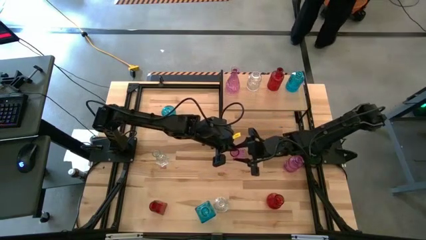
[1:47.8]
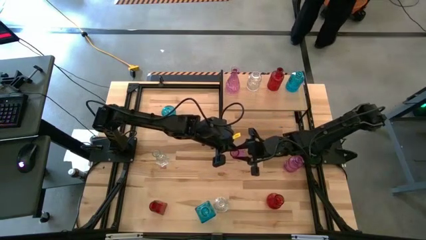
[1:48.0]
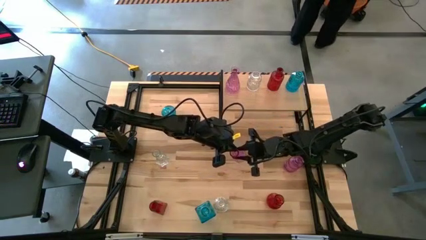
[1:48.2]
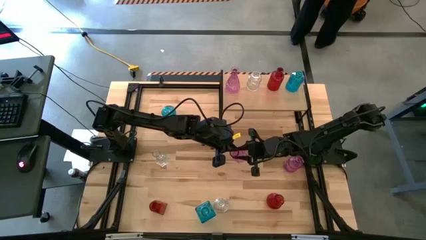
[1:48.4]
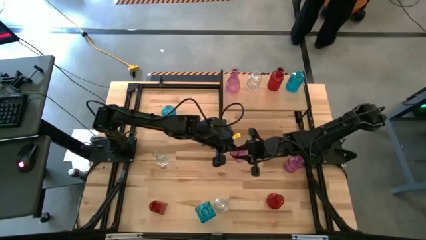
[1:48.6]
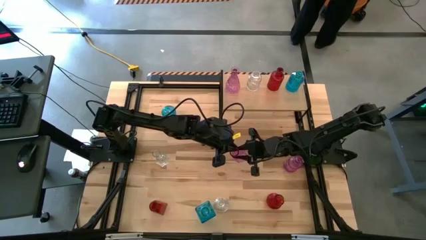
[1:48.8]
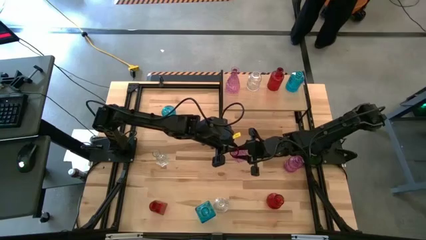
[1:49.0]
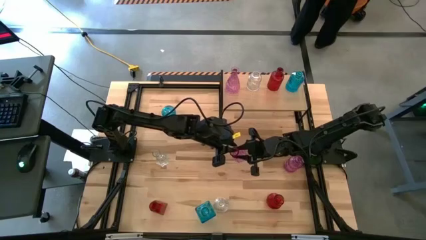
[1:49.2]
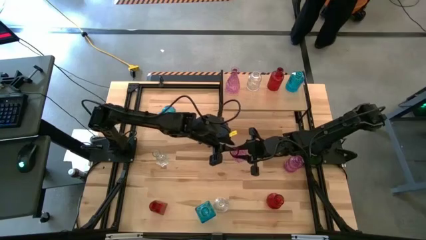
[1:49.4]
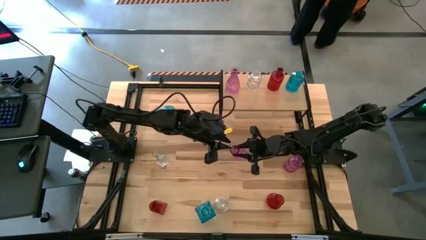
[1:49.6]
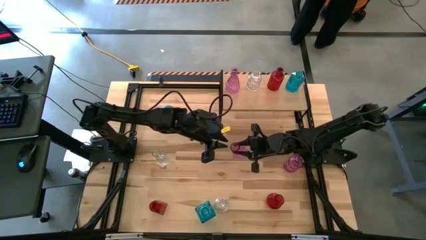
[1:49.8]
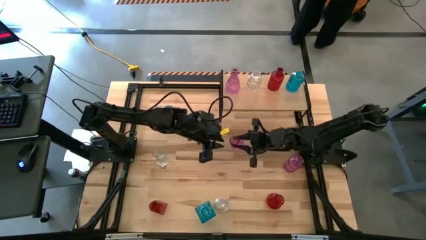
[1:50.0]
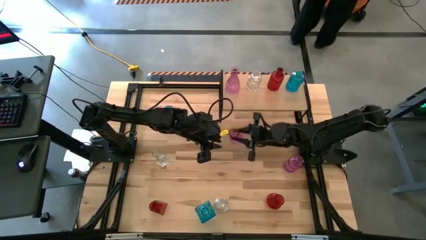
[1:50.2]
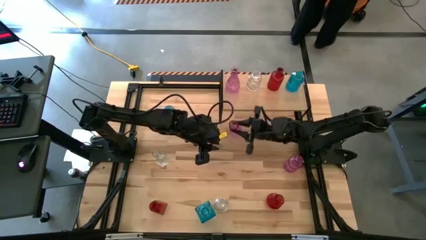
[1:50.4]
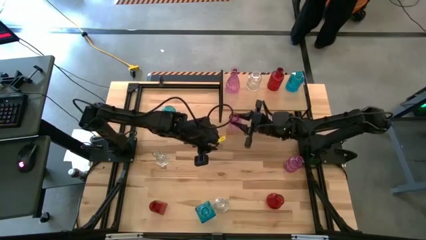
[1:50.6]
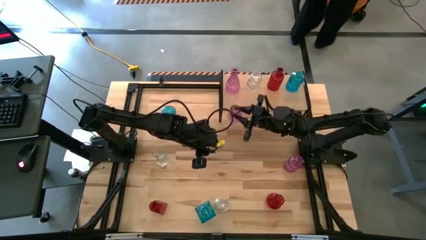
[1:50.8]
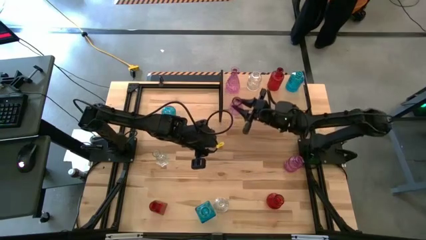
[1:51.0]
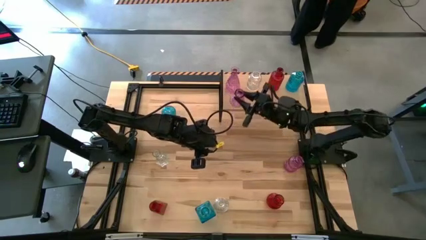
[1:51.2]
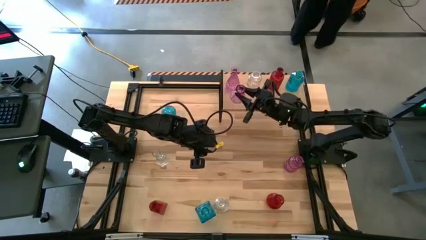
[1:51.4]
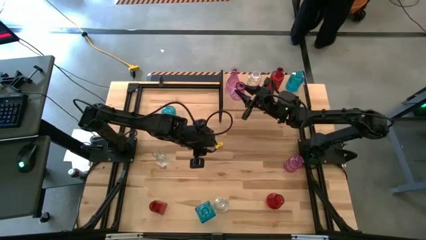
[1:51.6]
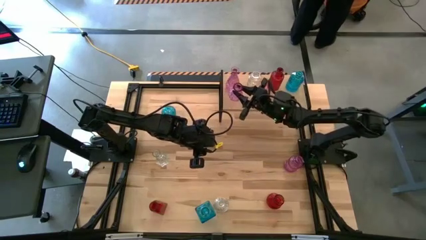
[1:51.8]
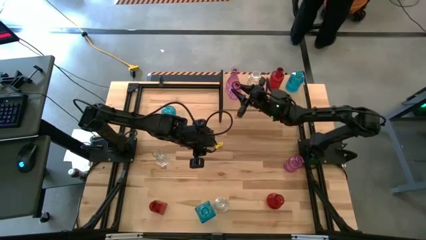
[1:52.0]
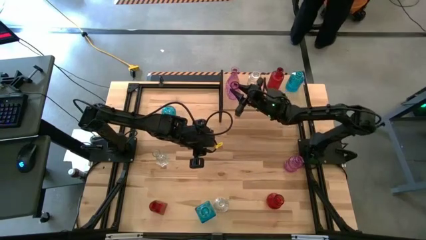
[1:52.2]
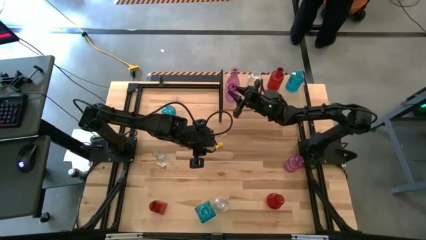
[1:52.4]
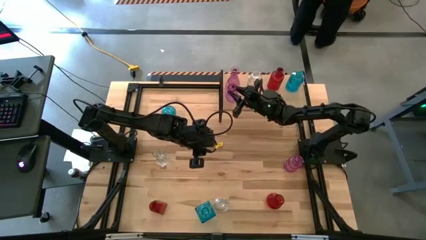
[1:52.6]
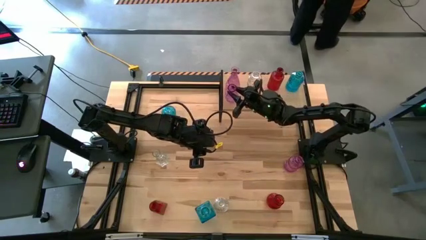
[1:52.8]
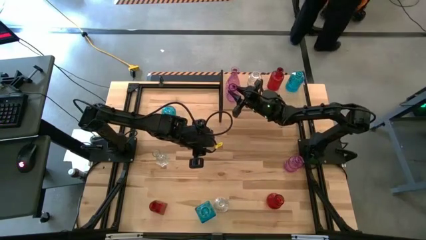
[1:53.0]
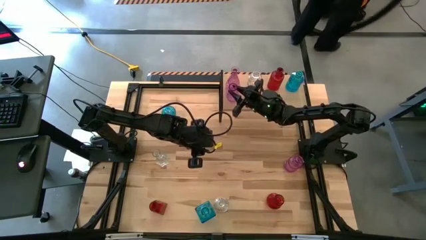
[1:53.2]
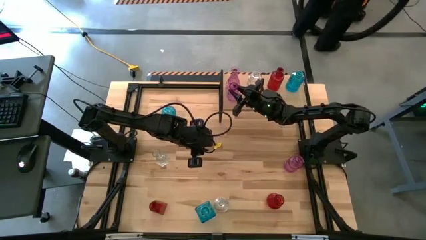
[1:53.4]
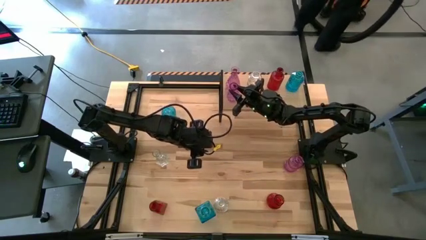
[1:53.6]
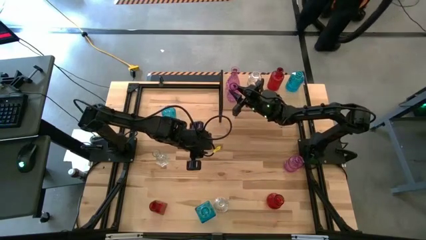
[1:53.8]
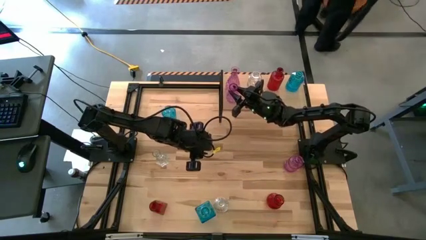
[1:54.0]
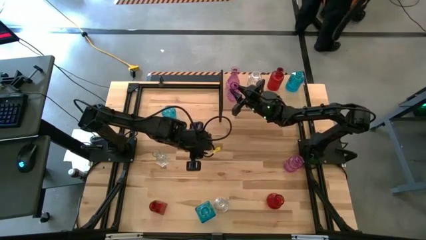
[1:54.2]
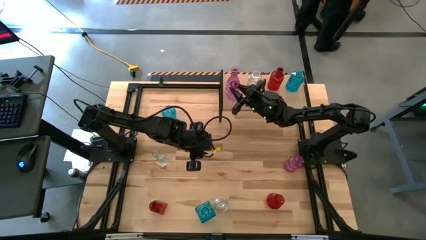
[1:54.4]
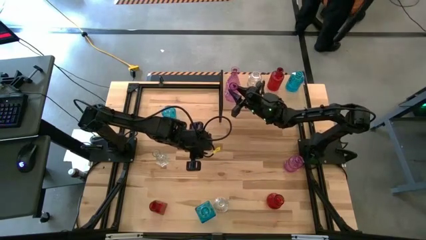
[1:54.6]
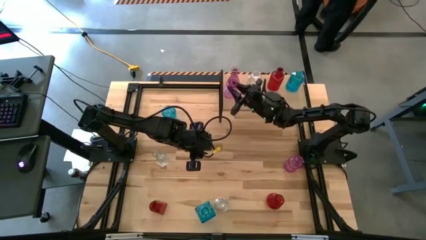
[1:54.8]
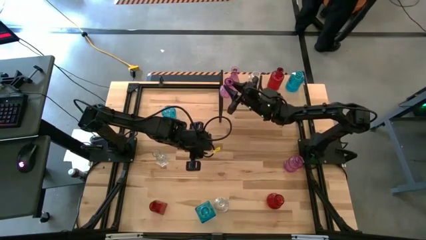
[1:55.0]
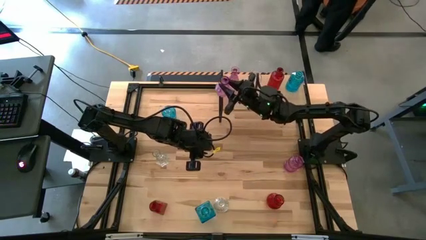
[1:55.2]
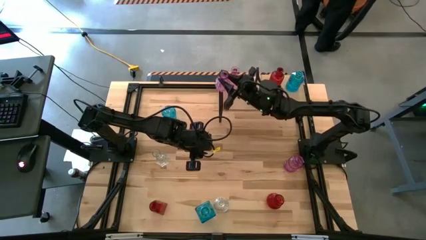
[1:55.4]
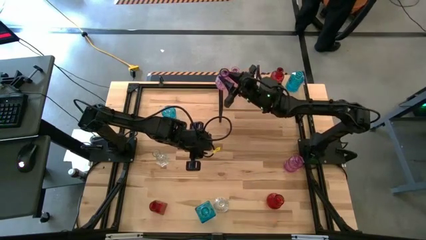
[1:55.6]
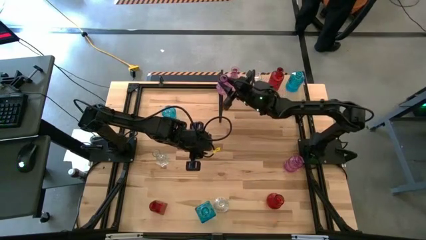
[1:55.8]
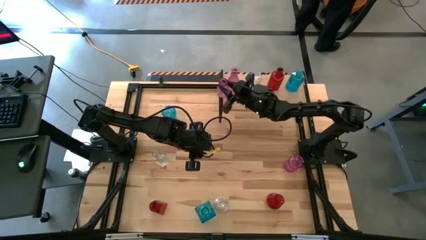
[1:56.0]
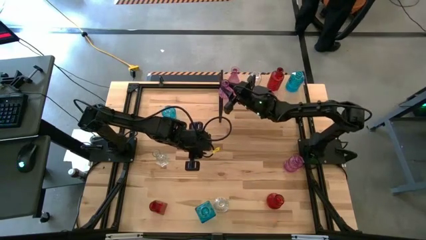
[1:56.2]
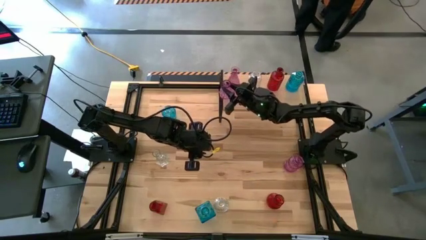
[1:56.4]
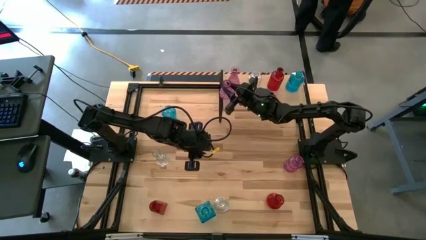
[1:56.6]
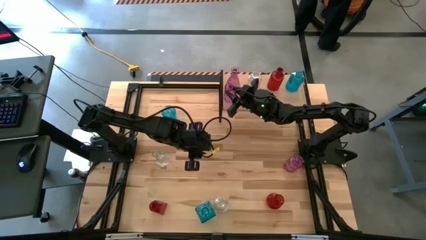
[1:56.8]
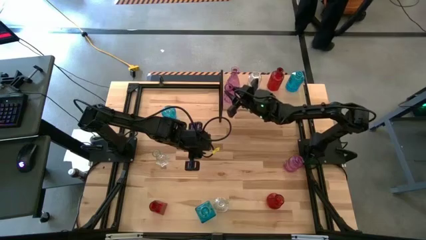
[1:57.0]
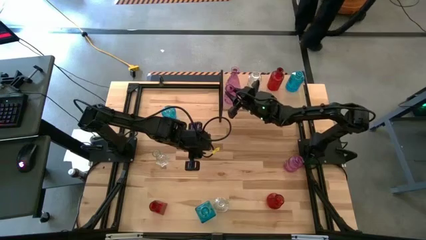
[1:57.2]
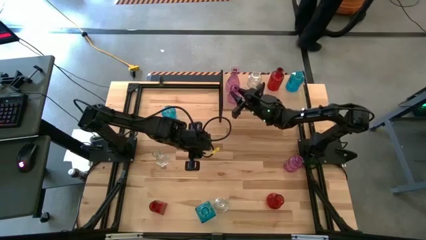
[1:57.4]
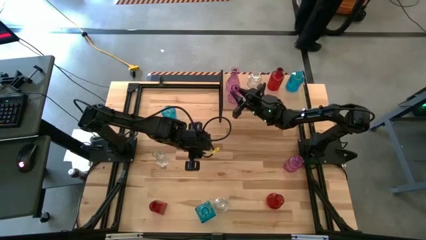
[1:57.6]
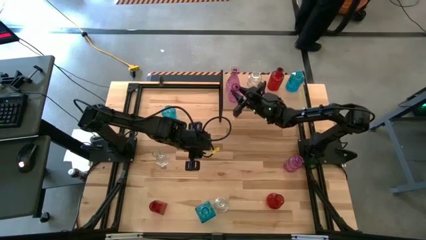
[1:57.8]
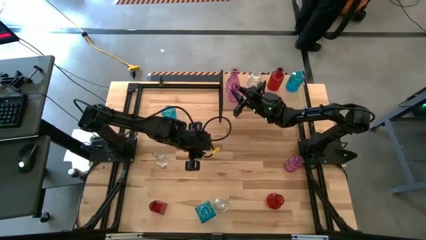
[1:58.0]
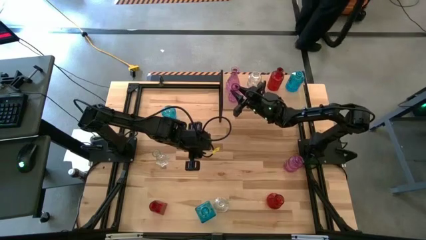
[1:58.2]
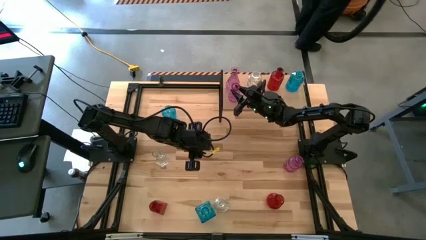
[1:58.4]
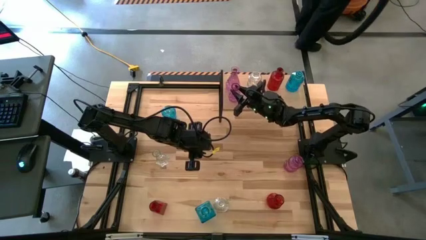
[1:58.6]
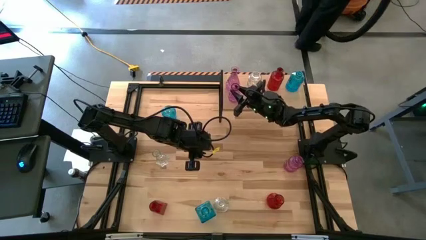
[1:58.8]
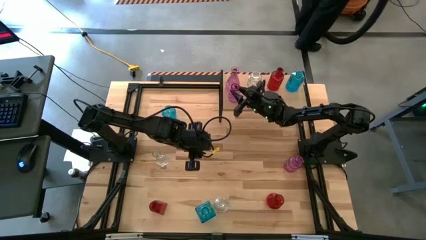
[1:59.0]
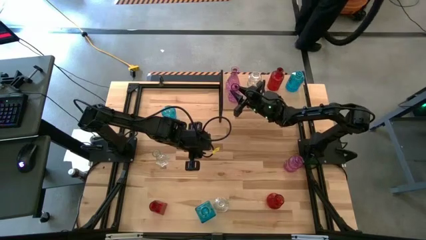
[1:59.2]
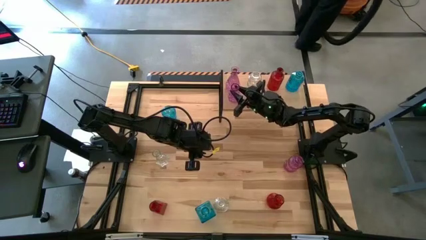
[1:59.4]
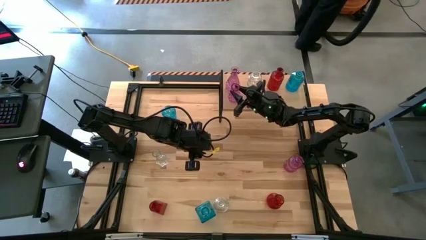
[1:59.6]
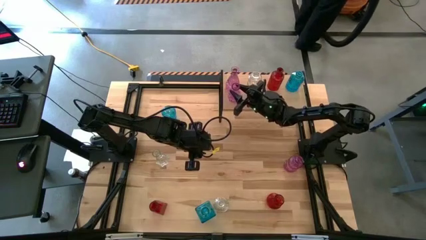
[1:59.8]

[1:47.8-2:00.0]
Task: sort vases onto shelf
Put the left pink vase on the shelf aligned with the other pink vase
